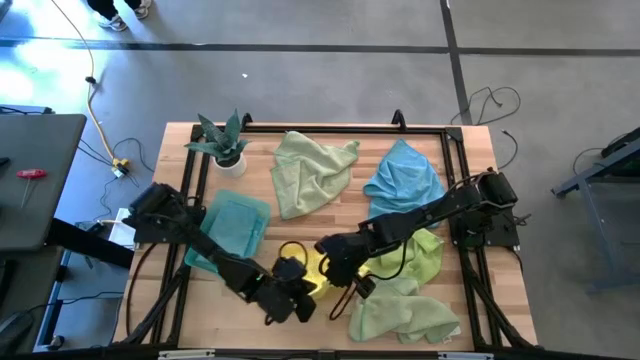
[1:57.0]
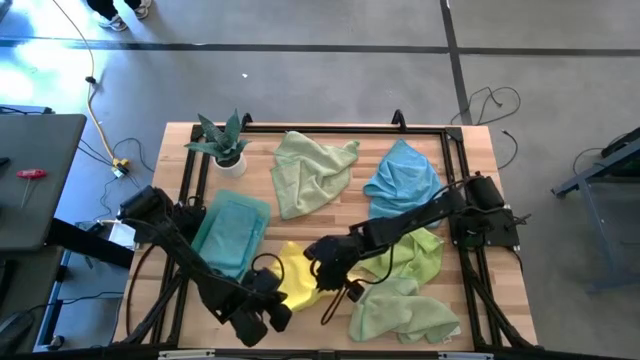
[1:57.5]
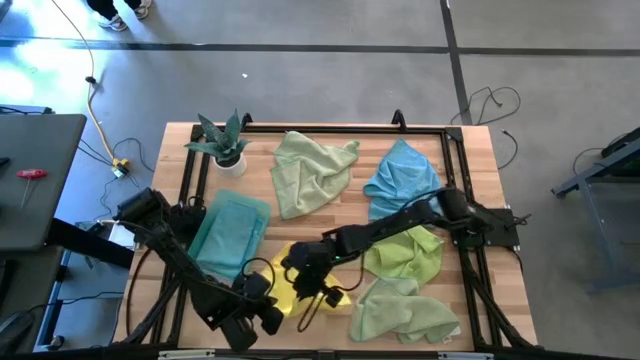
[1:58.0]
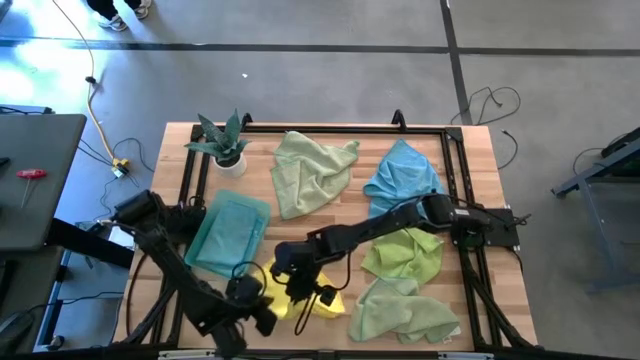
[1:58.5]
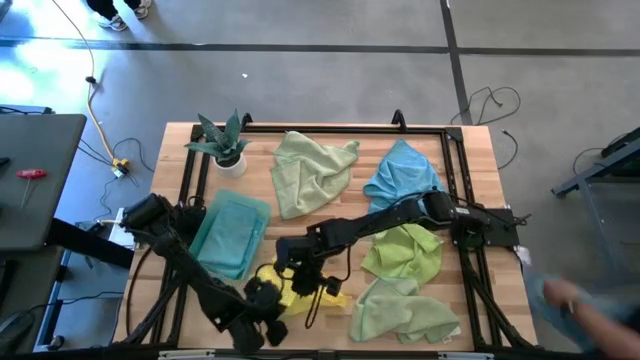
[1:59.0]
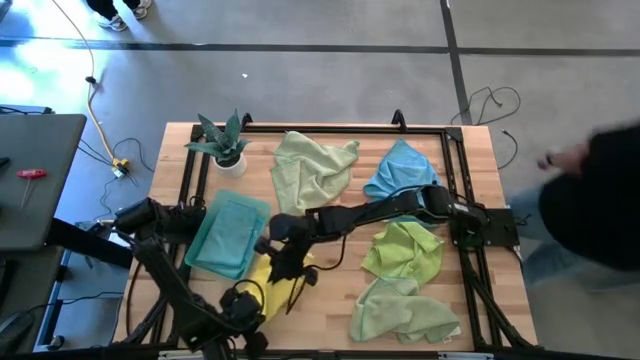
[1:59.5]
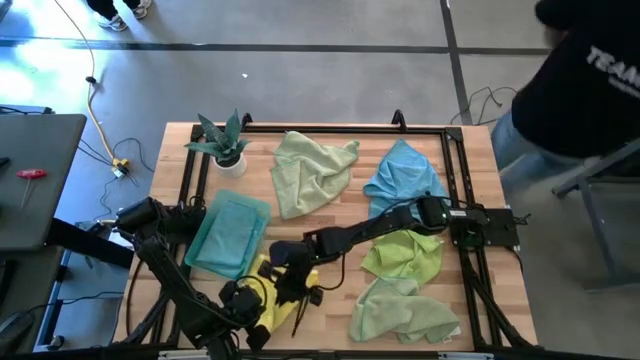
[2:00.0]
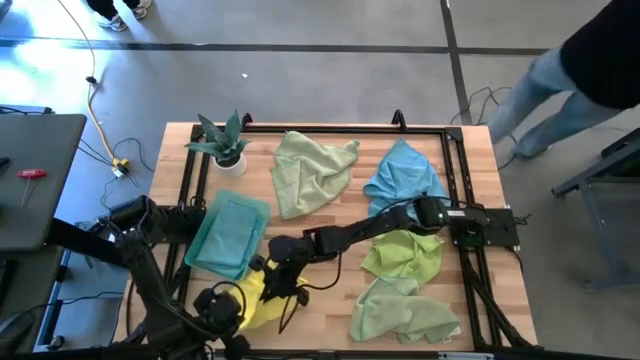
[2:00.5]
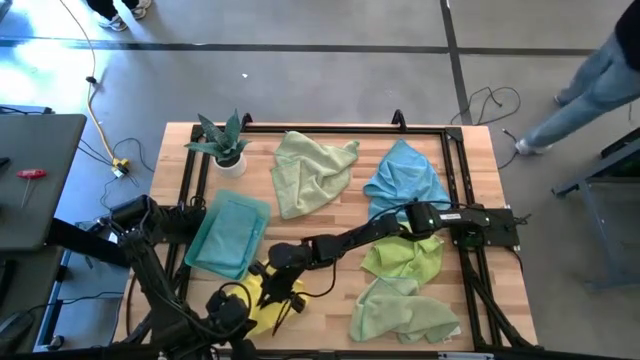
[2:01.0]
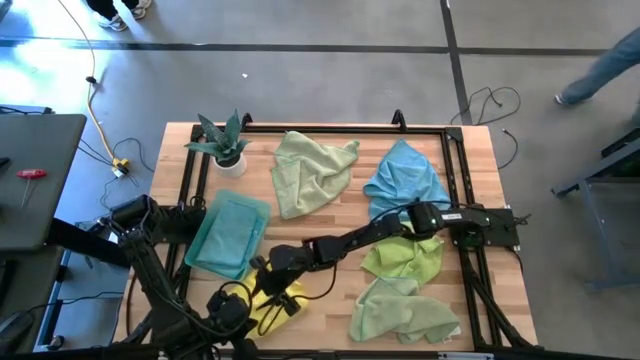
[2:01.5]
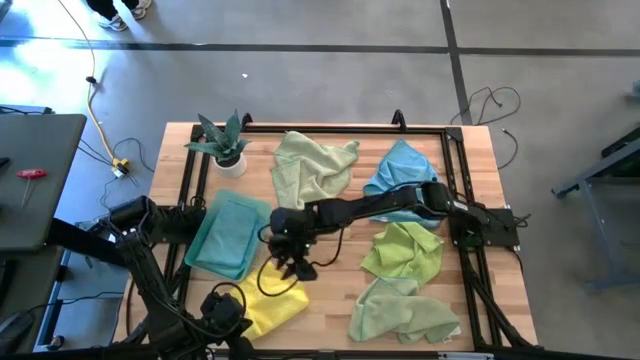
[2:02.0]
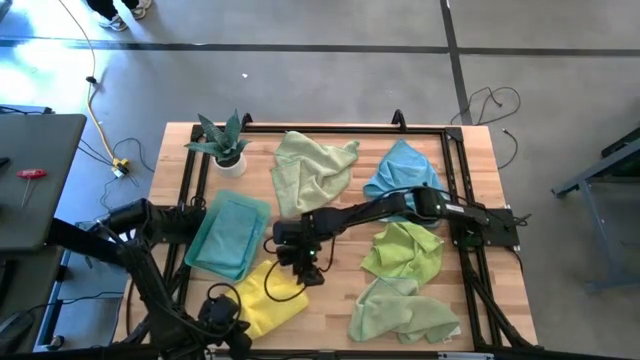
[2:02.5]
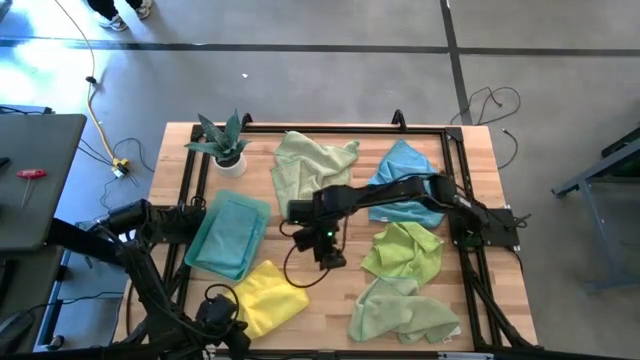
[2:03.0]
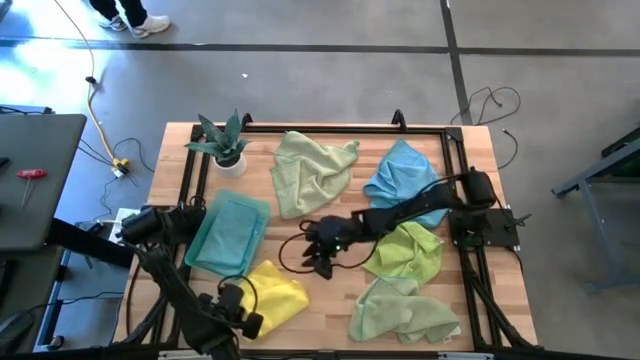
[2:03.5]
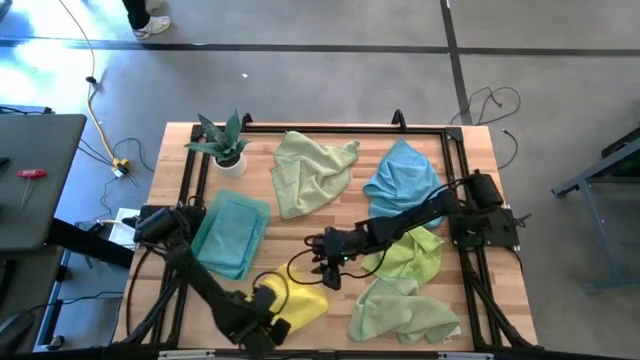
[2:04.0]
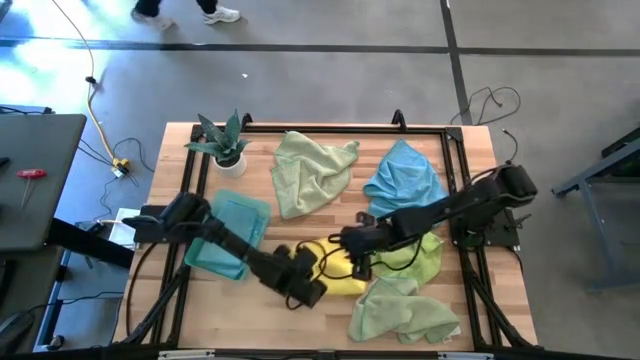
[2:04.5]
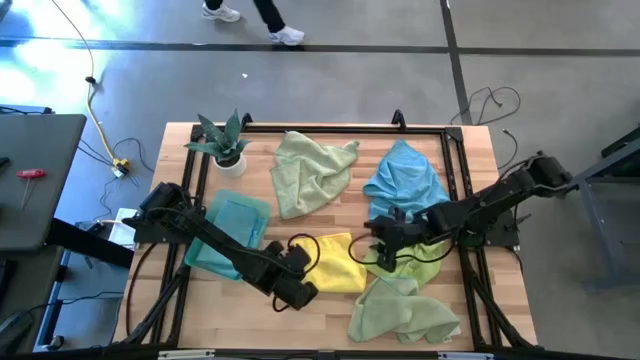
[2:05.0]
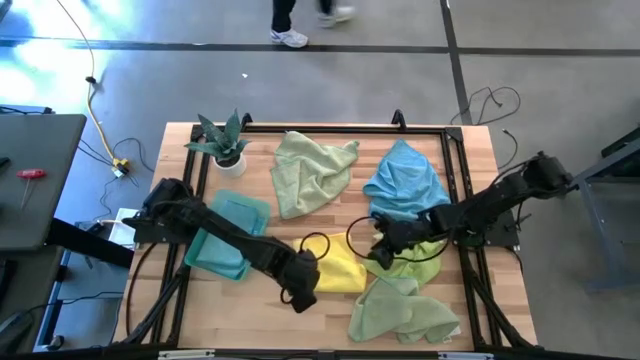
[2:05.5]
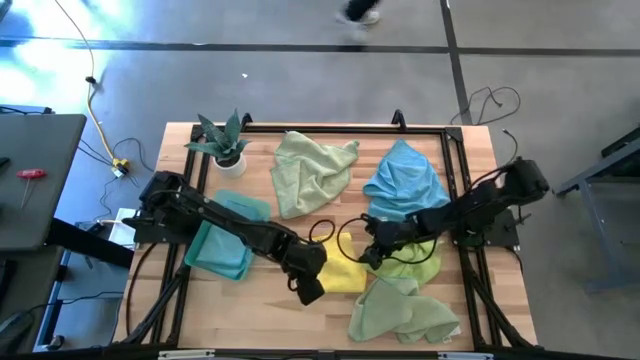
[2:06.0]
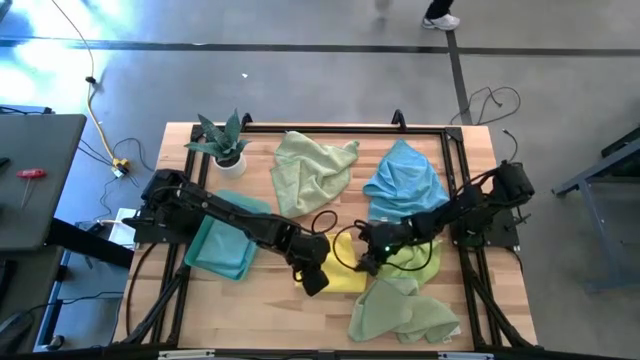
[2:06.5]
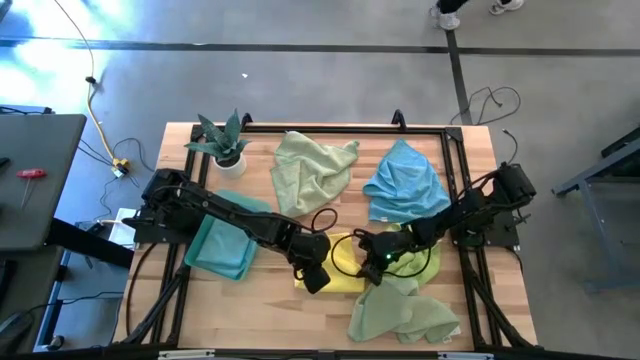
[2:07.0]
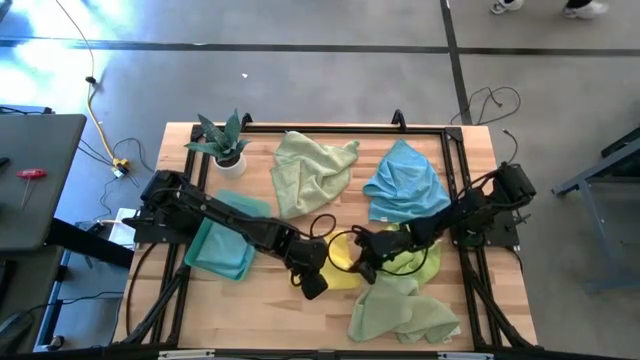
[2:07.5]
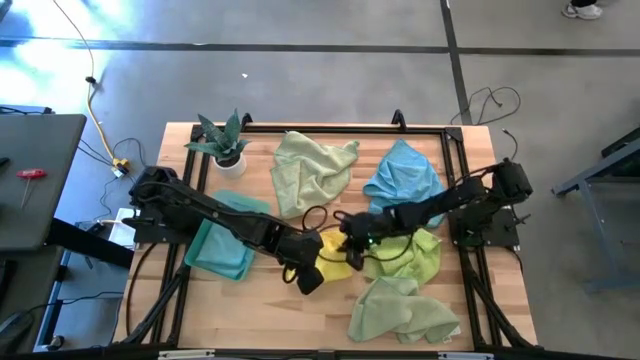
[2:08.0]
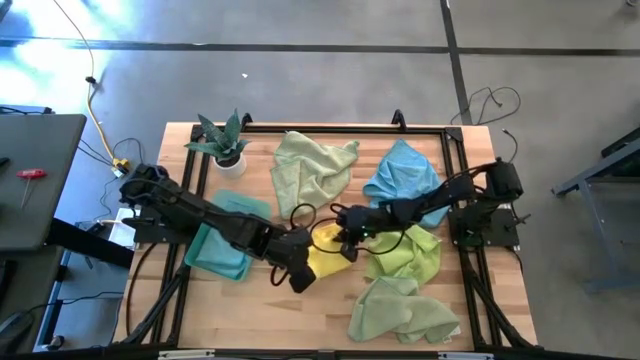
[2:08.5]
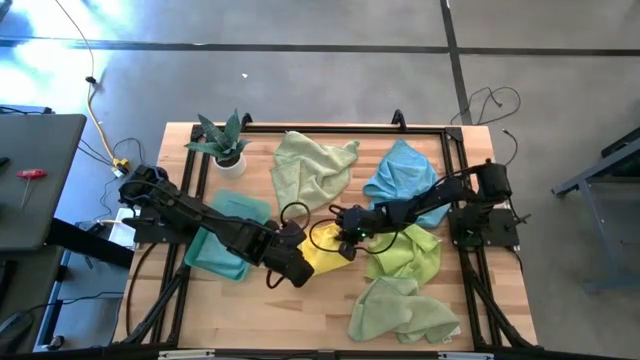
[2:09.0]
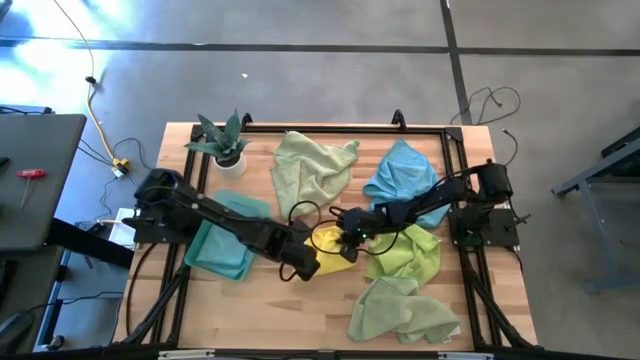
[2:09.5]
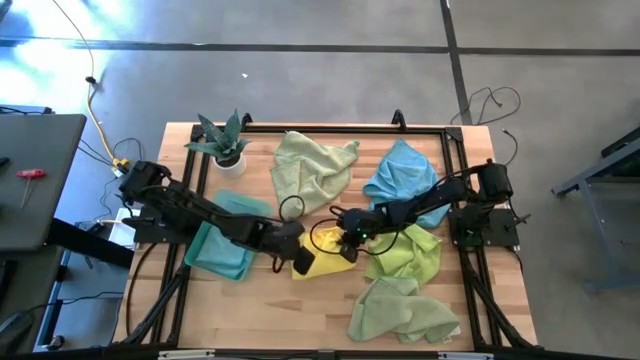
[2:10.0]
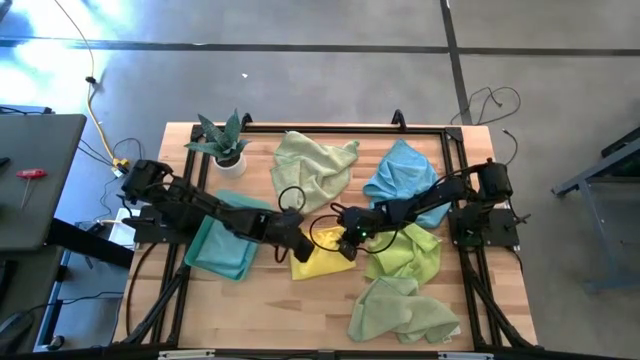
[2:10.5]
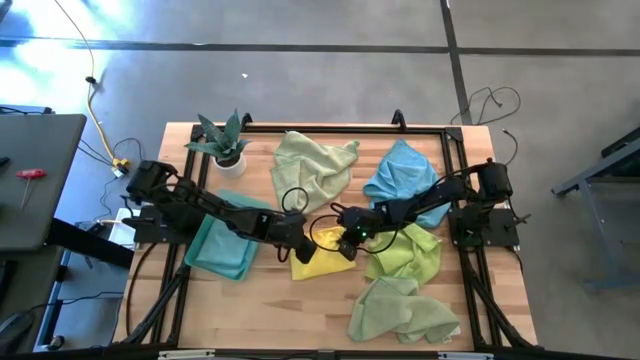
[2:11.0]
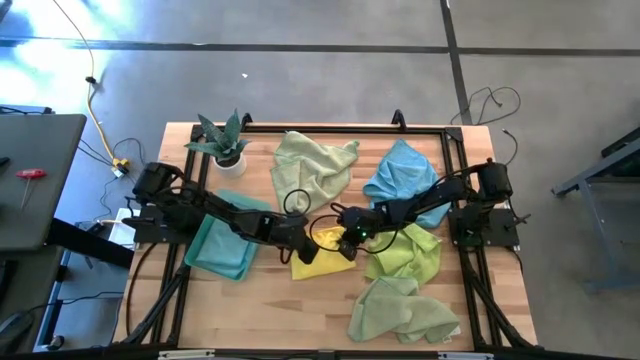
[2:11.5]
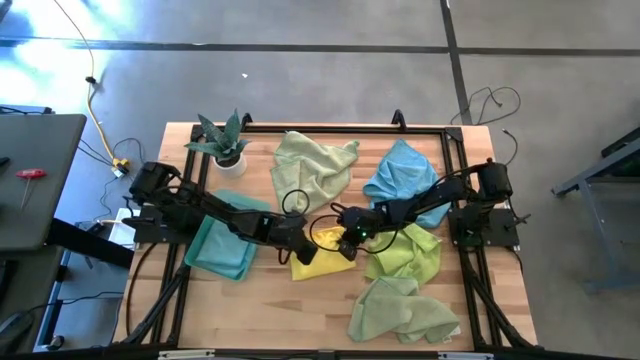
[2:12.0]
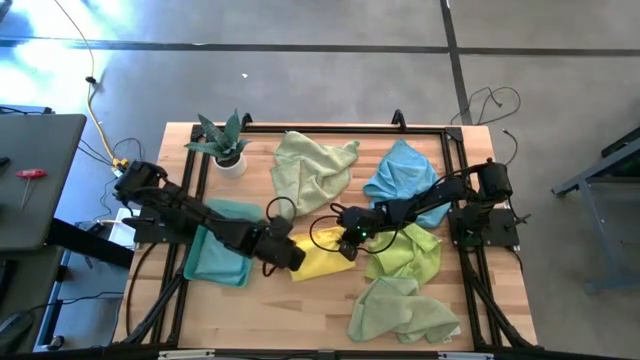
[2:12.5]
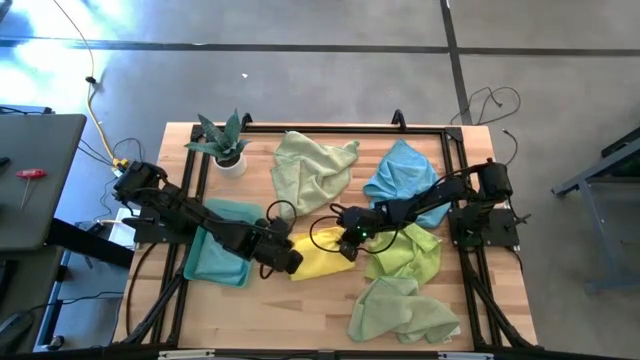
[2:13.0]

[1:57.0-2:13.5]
Task: Fold microfiber towels
Fold the yellow microfiber towel

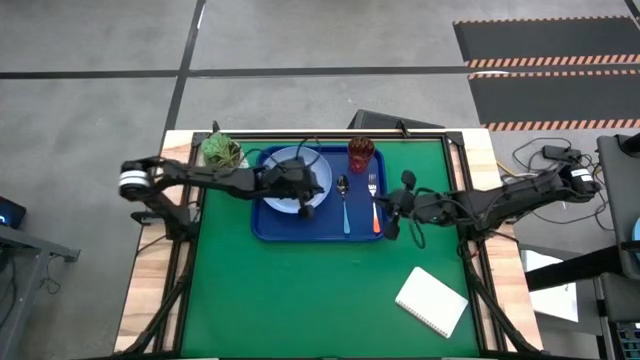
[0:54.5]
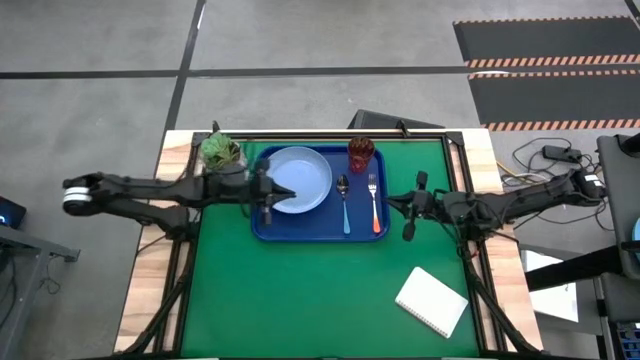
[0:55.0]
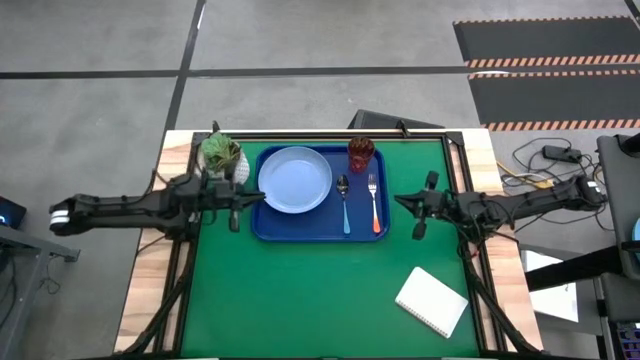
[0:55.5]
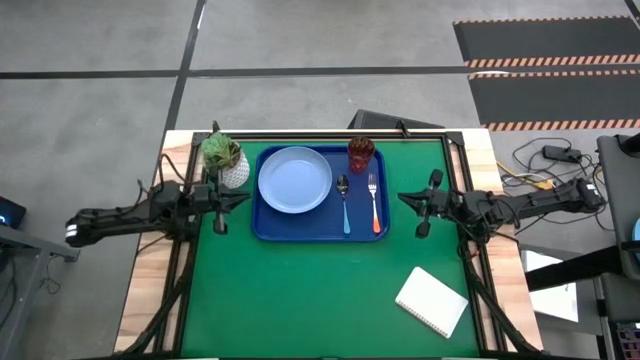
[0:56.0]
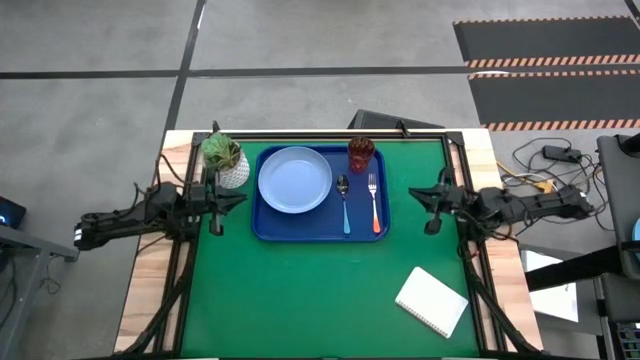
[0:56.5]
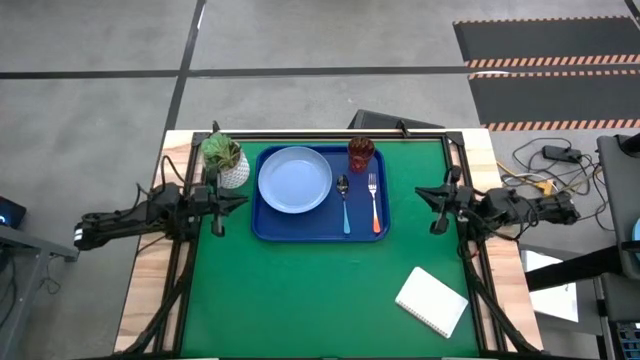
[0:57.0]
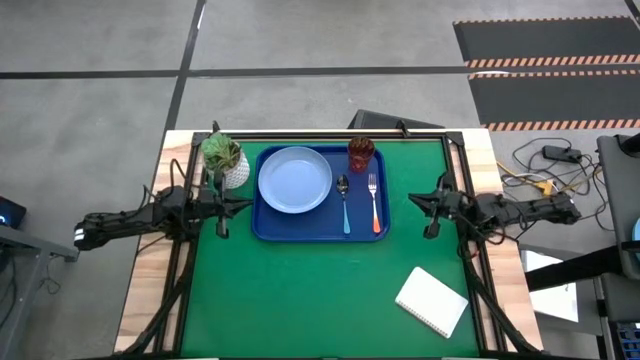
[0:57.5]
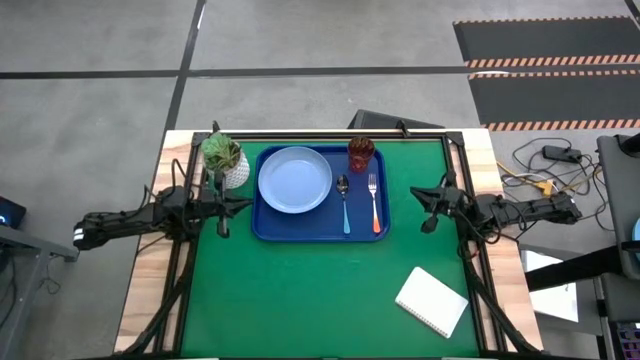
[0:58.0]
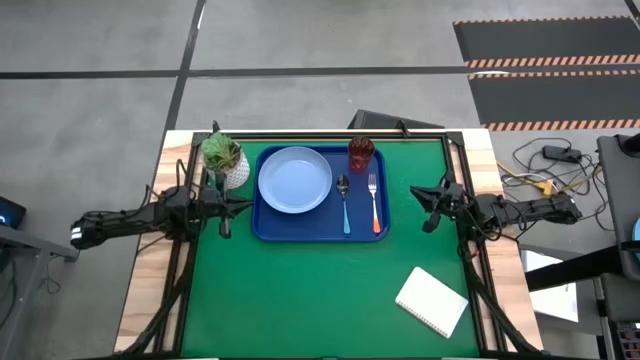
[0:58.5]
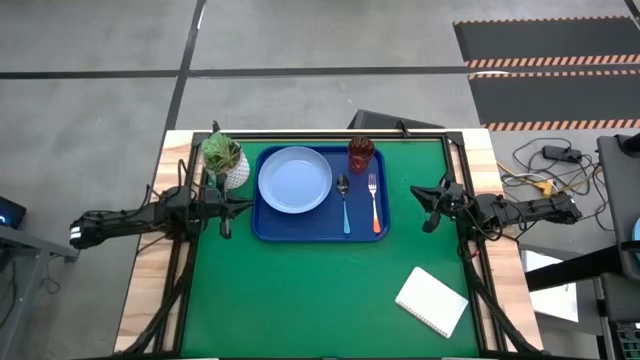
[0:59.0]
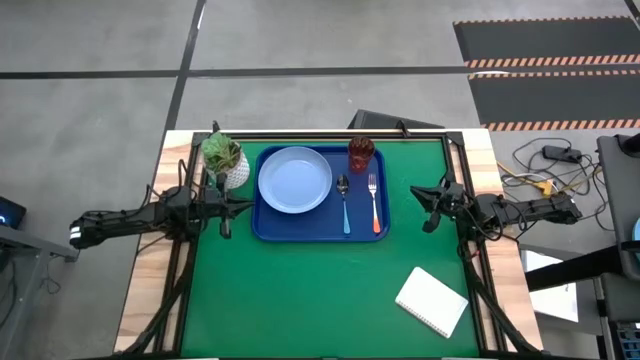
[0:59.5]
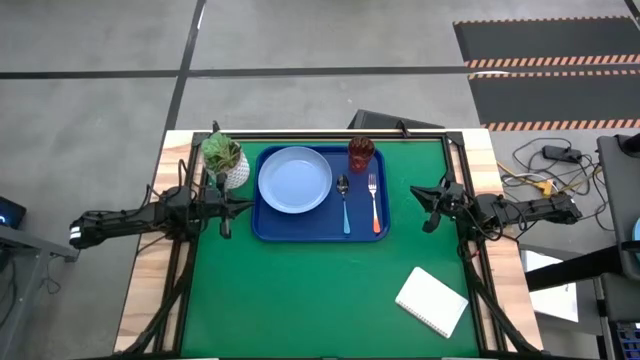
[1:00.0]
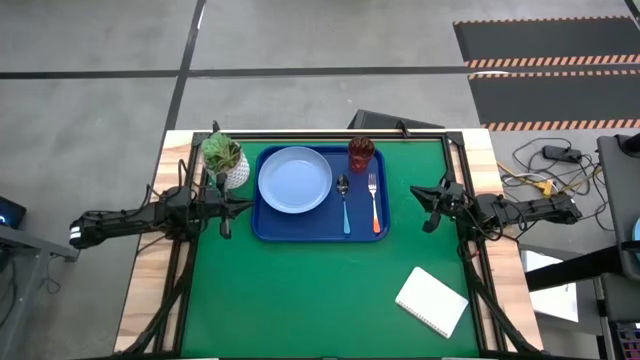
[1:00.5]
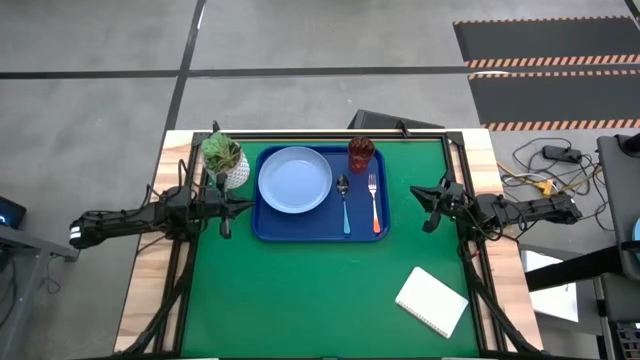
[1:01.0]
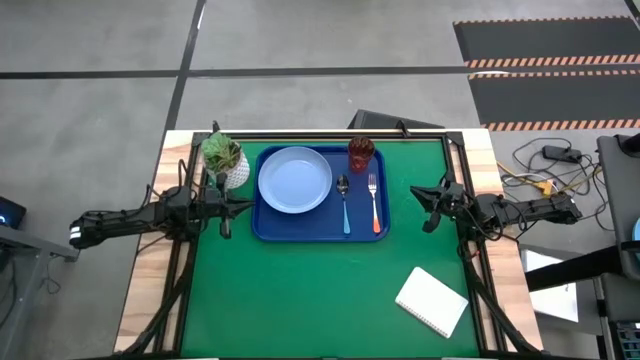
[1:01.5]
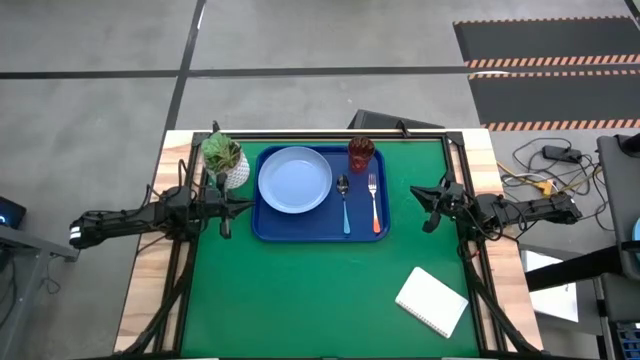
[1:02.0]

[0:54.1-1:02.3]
Task: Pick and place plate/cup/fork/spoon on tray
Return to Home Position
